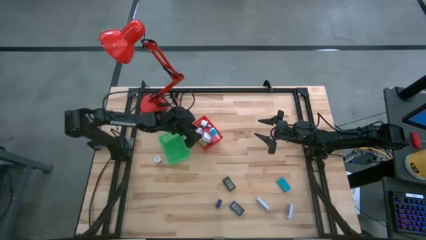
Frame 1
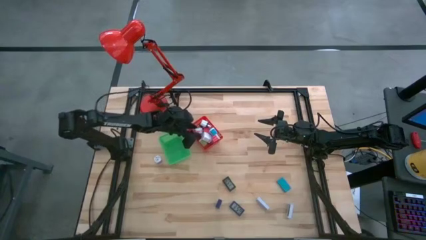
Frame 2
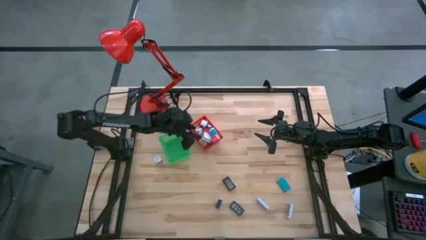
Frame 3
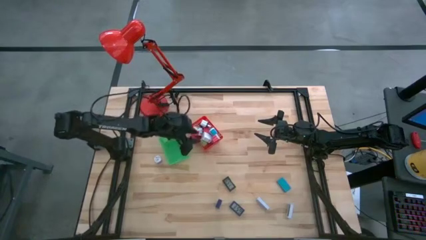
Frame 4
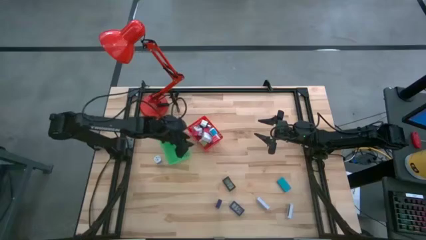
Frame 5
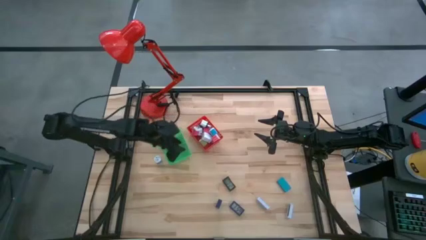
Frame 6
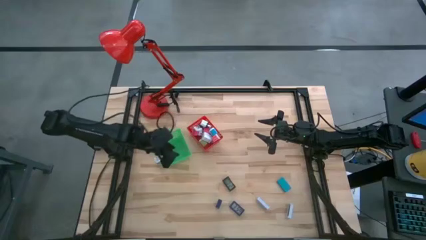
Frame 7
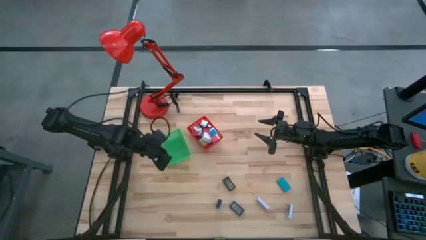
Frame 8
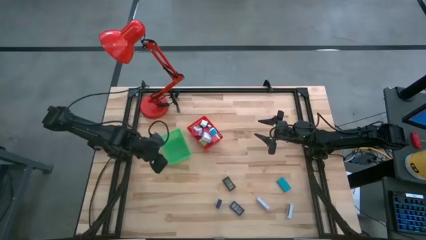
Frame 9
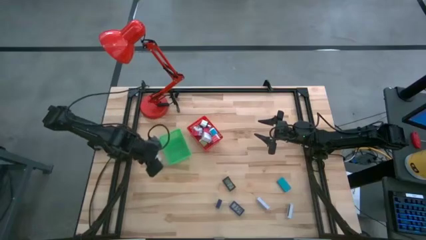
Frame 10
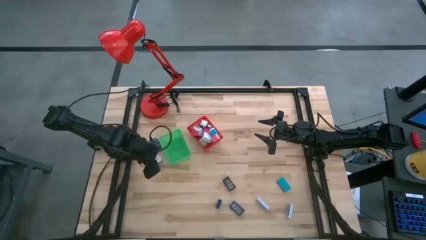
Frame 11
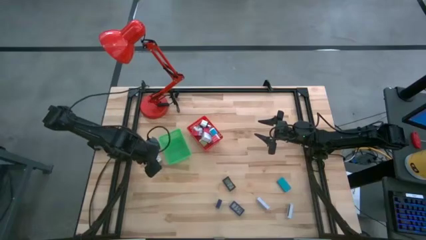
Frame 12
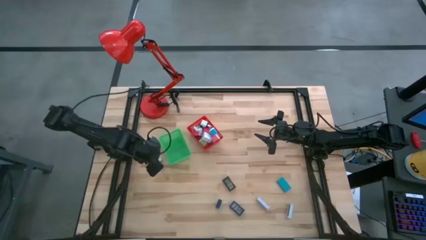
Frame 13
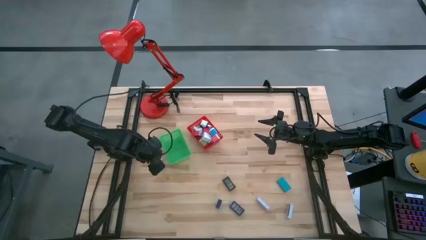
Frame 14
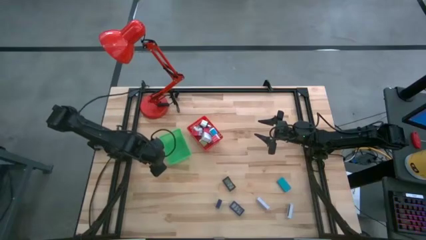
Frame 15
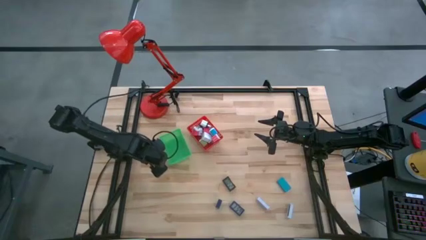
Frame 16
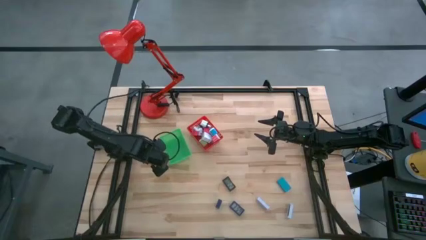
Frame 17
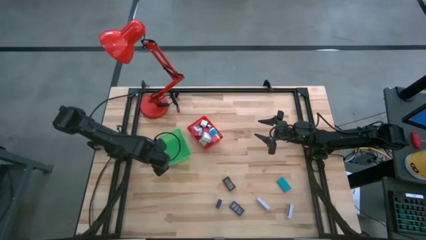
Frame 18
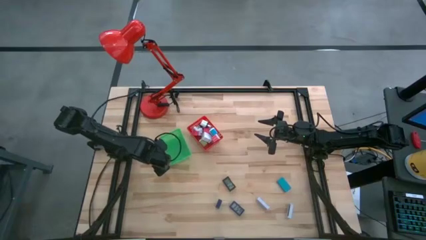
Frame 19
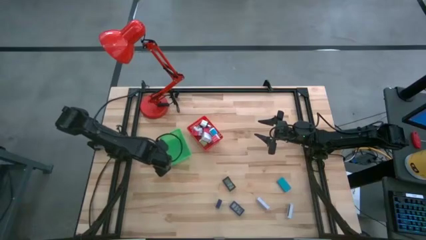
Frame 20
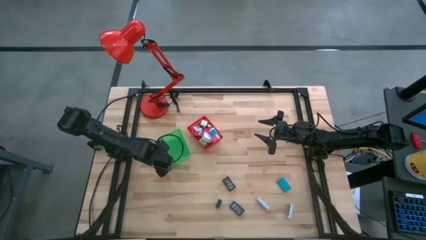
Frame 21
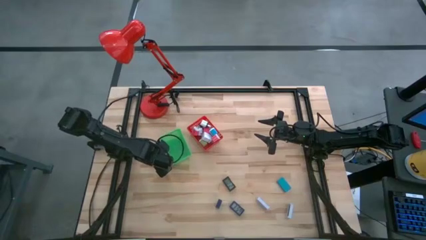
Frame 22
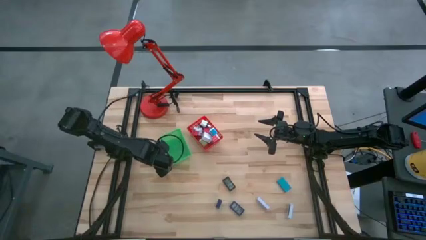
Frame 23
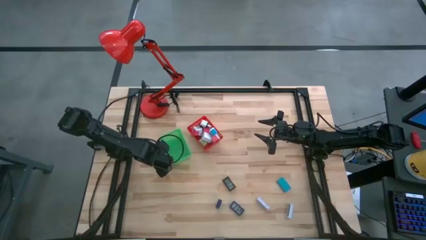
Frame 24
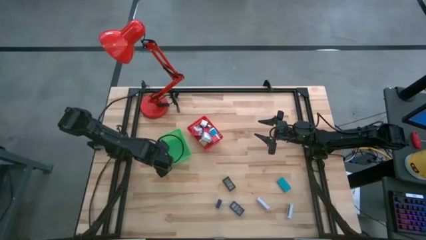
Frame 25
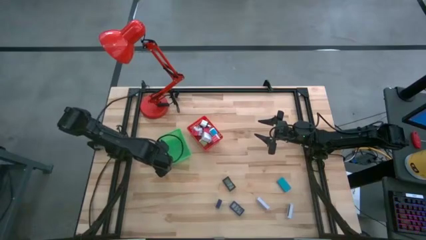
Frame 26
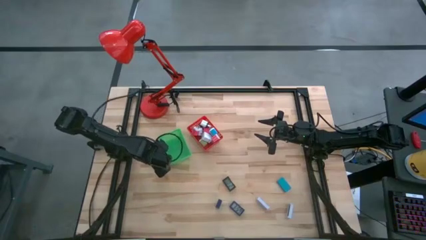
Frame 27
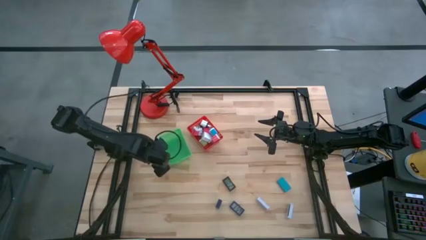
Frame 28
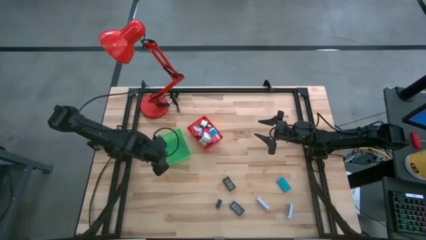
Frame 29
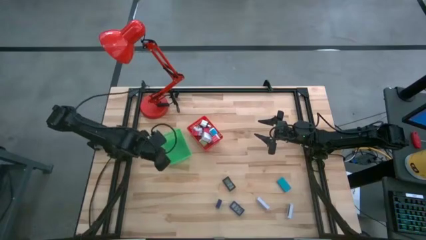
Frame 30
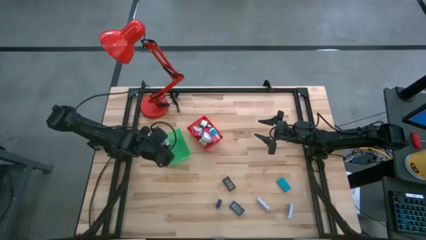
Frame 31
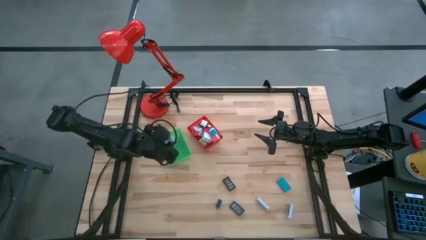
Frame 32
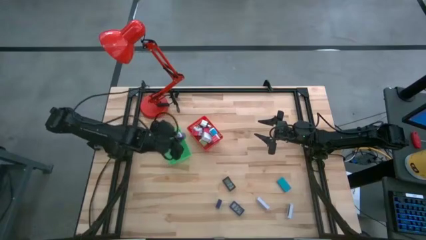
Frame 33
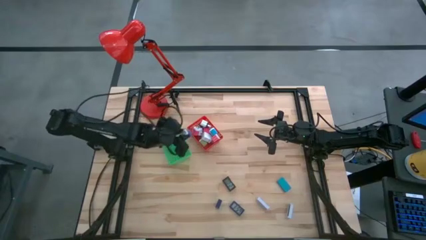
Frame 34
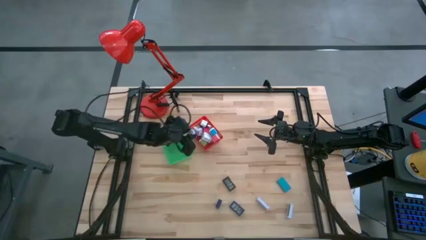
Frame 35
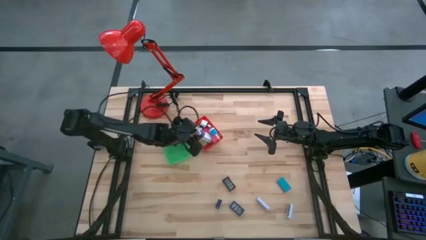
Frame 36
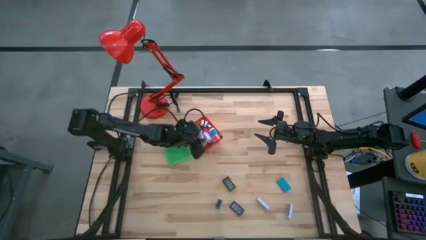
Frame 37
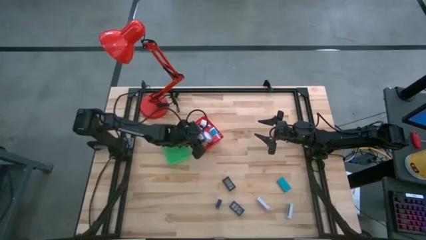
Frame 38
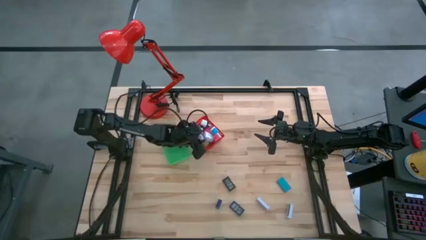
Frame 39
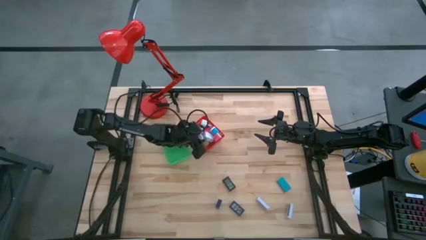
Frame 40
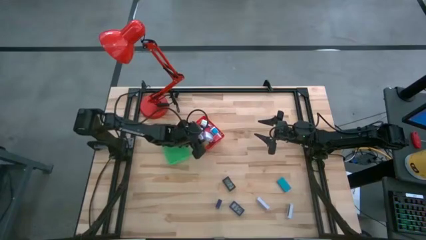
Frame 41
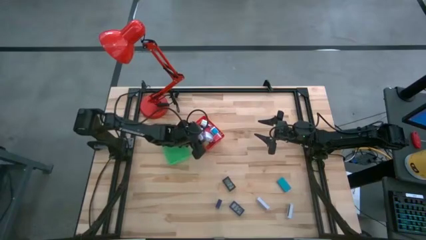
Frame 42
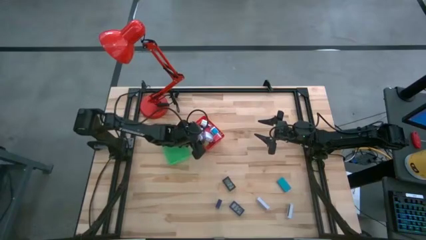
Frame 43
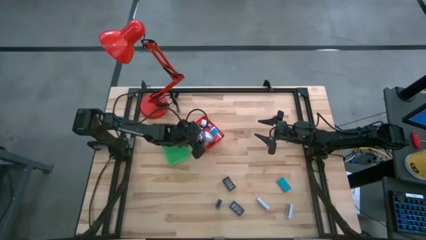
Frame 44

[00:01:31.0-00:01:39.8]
Task: Pick & Place Office items
Put the dark blue charger adapter into the red bin

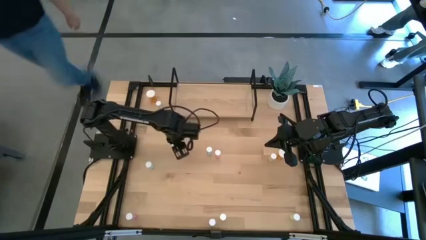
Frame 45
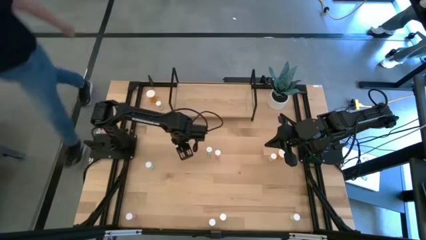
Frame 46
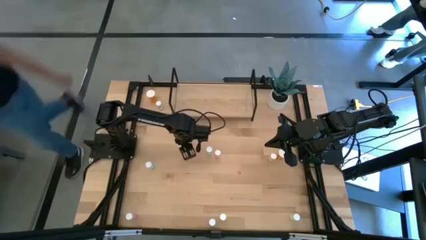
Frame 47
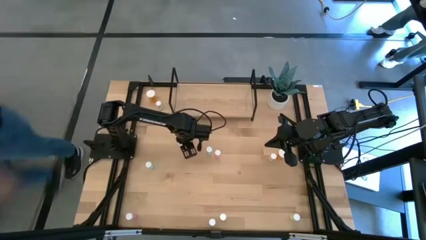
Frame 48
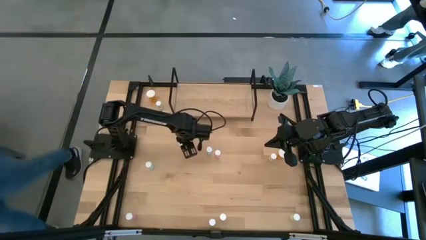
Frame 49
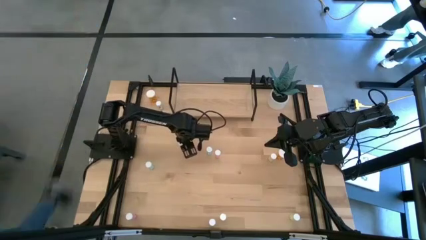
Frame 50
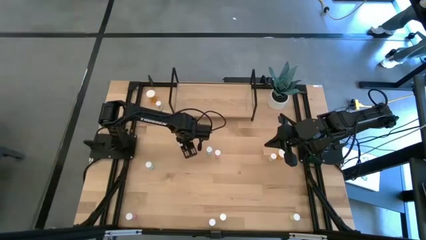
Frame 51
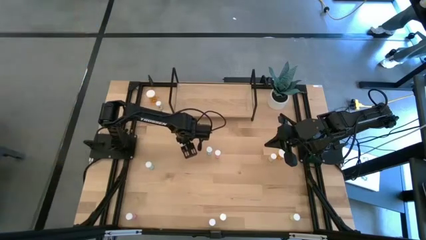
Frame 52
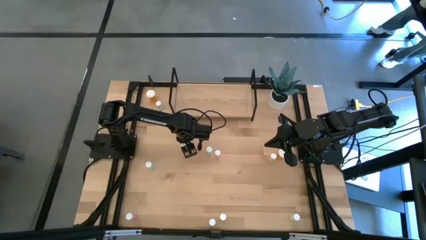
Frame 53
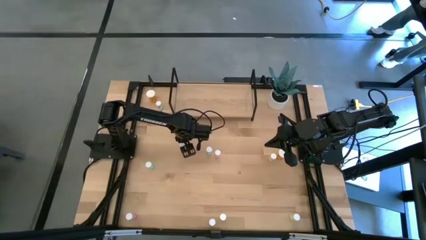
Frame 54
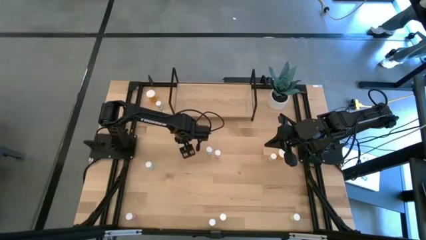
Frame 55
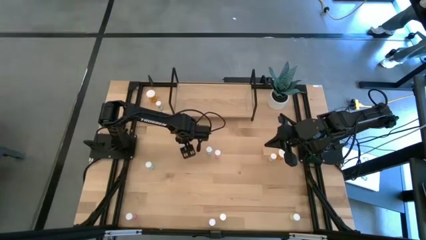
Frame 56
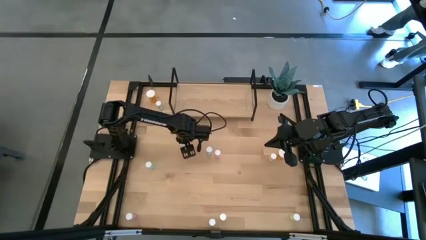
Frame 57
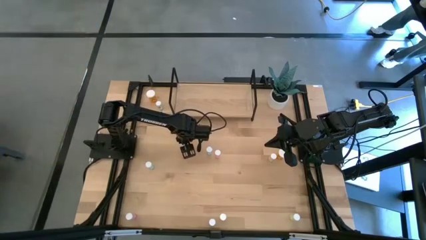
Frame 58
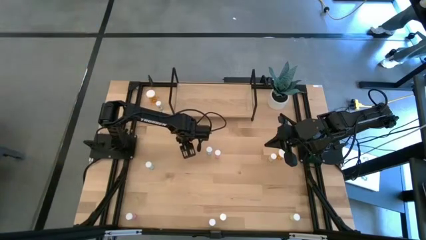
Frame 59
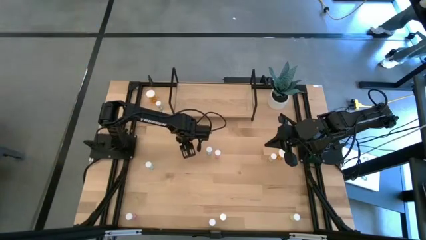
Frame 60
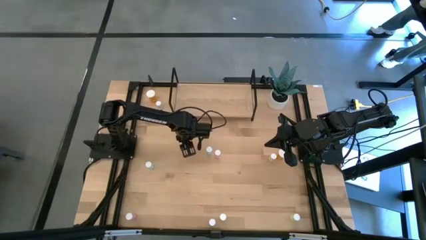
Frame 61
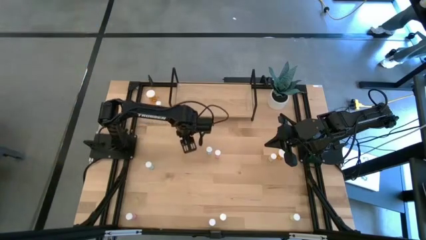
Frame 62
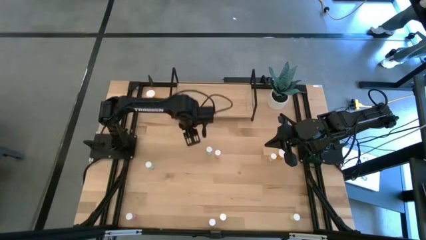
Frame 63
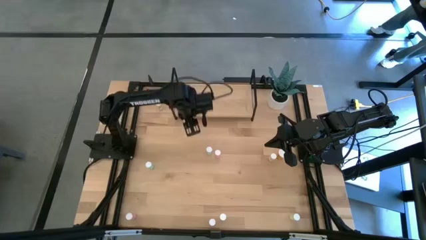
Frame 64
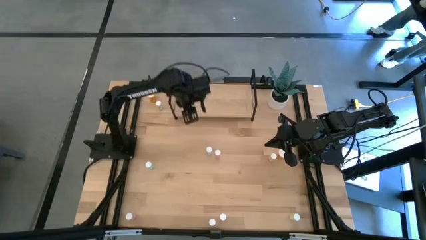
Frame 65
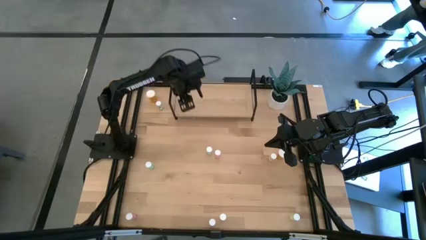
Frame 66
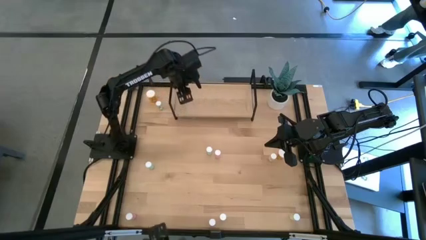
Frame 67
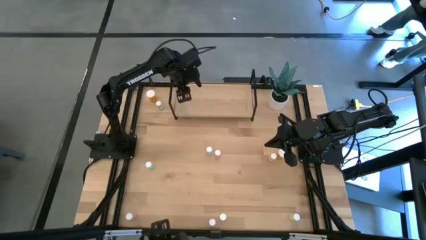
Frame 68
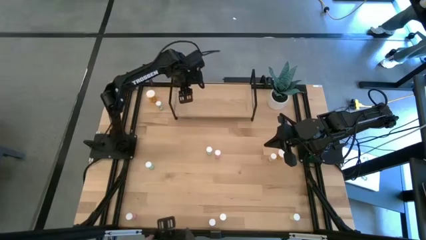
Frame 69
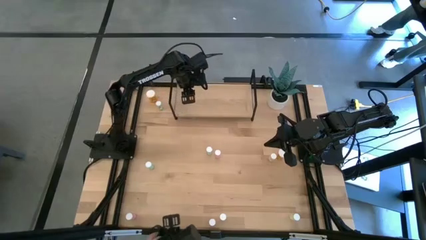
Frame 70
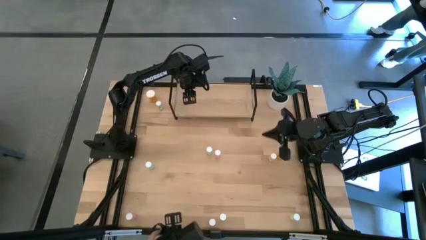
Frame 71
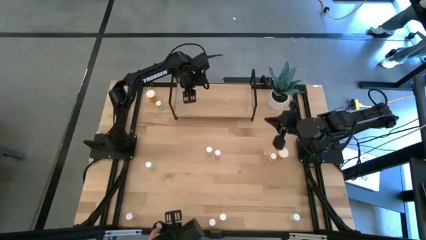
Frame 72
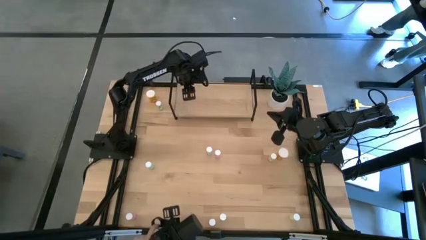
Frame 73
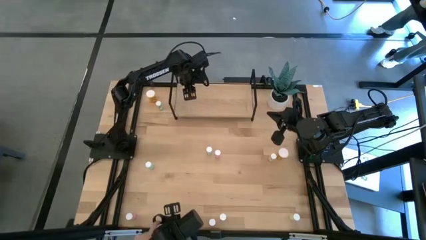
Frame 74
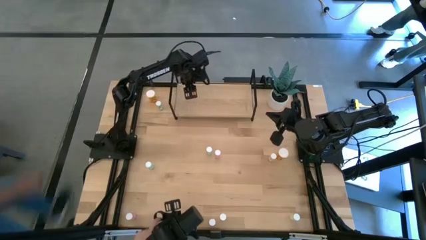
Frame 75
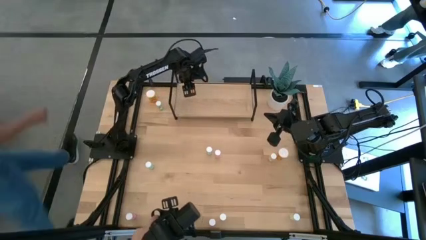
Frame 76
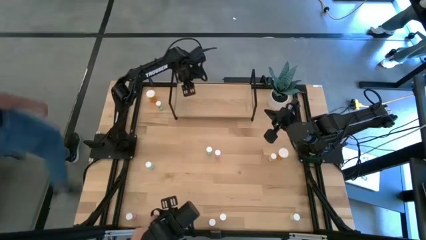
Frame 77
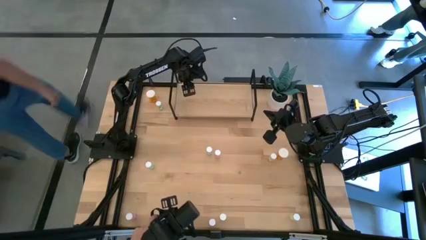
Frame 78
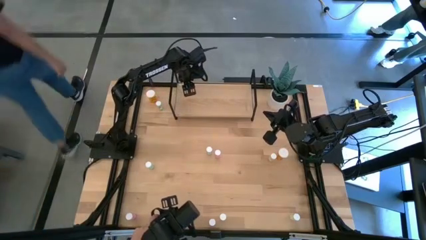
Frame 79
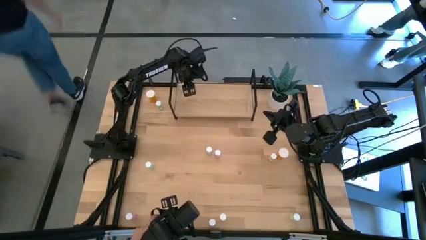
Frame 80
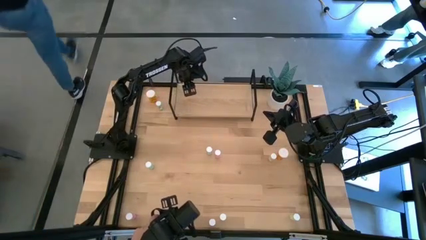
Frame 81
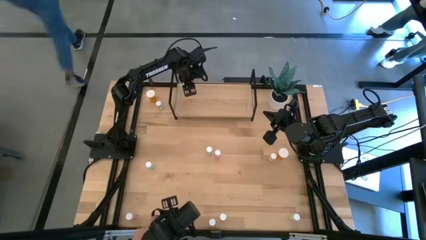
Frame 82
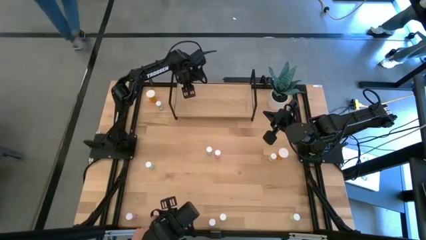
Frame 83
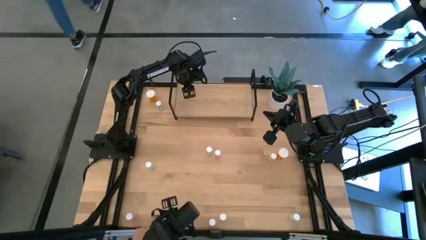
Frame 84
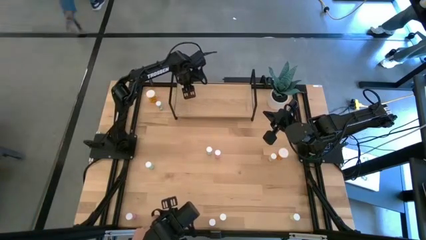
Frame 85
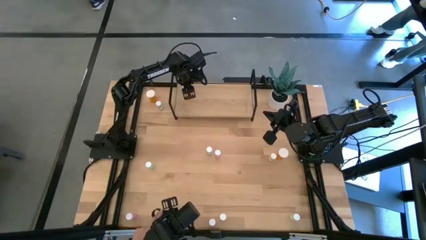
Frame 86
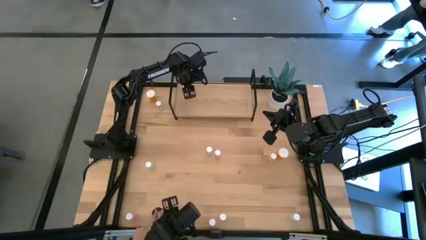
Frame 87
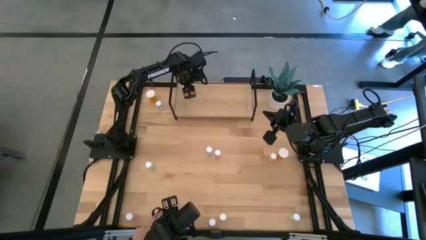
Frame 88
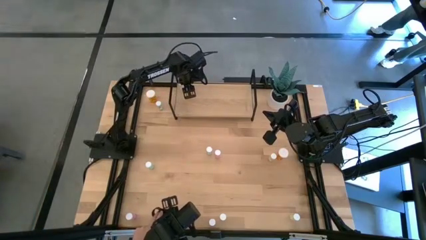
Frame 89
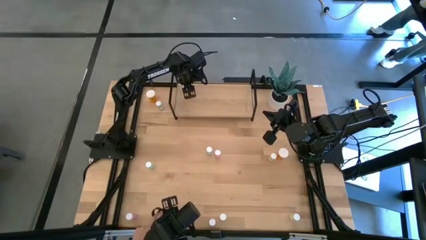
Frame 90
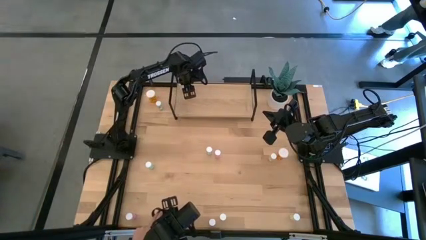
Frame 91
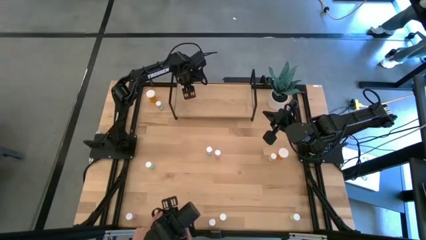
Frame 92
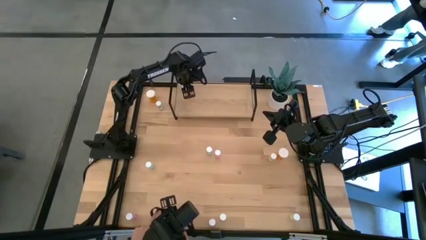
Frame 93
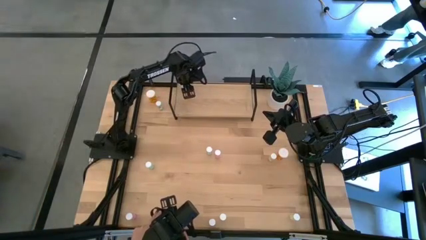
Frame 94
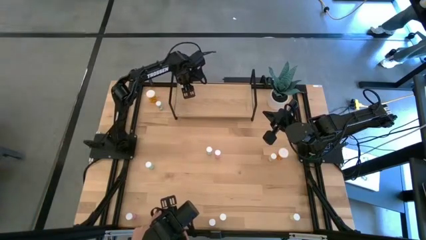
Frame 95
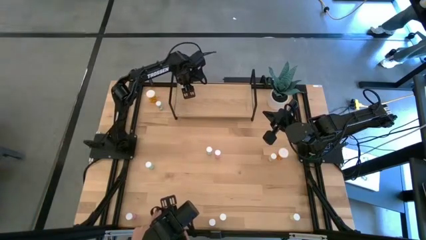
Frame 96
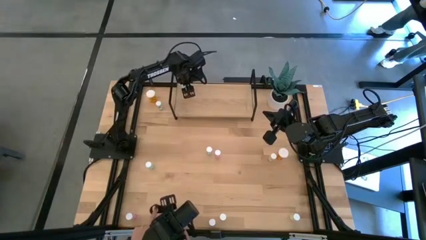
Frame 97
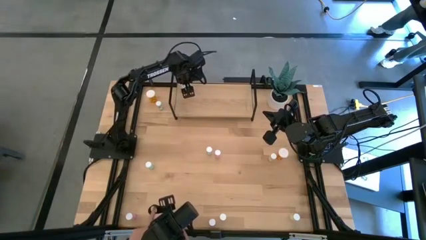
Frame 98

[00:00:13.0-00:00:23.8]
Task: Pick and place medicine bottles onto shelf by color
Put the bottom left orange pill bottle on the shelf
